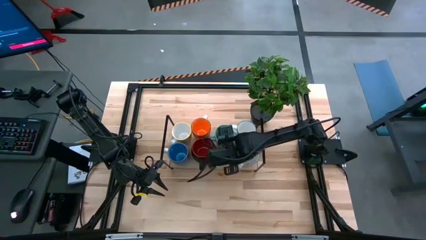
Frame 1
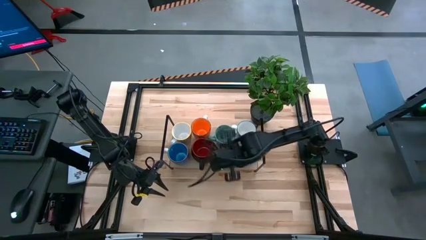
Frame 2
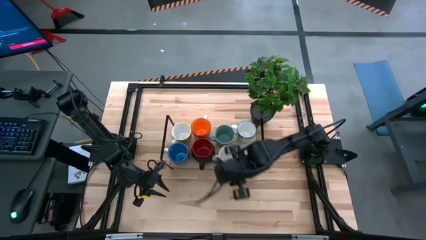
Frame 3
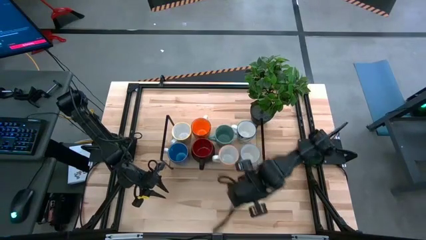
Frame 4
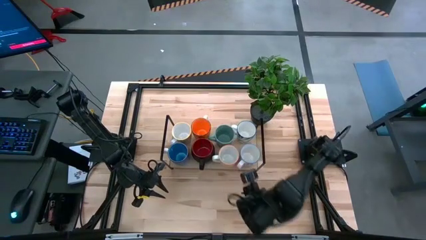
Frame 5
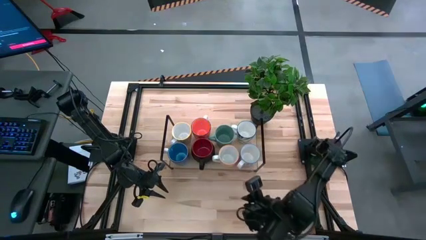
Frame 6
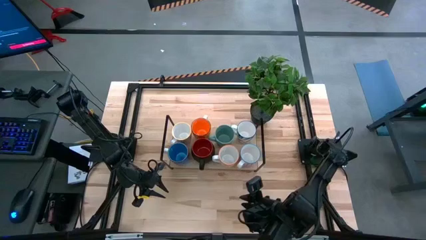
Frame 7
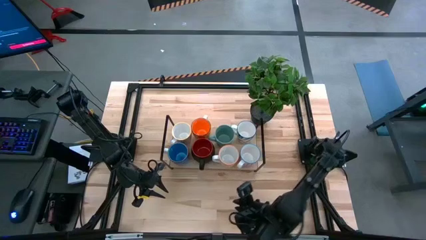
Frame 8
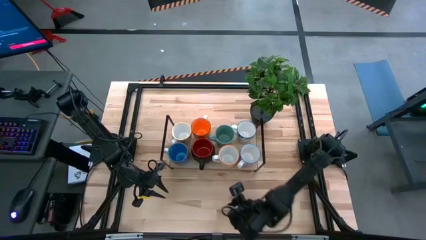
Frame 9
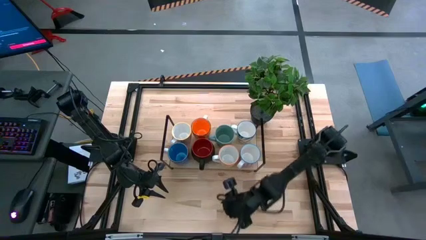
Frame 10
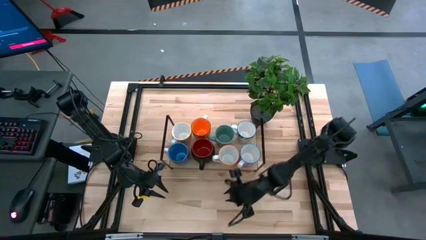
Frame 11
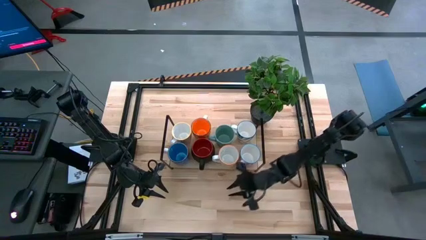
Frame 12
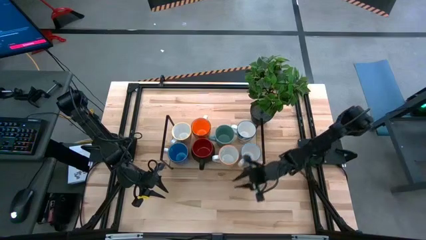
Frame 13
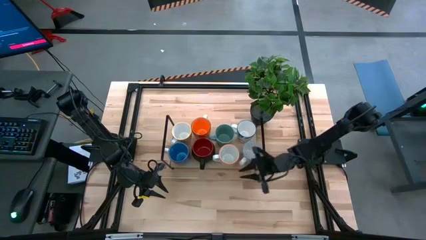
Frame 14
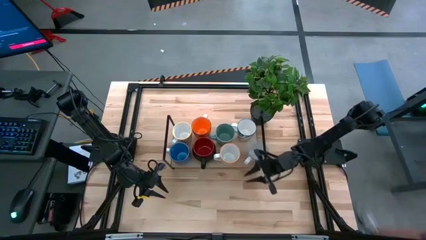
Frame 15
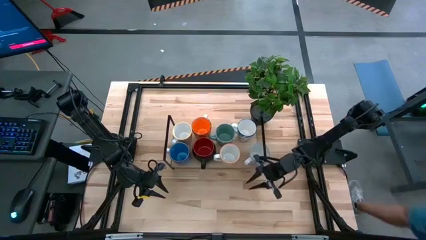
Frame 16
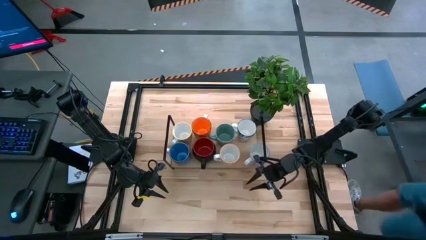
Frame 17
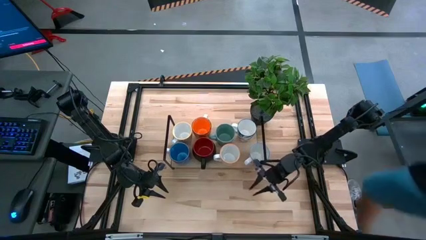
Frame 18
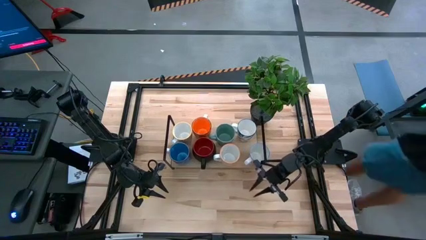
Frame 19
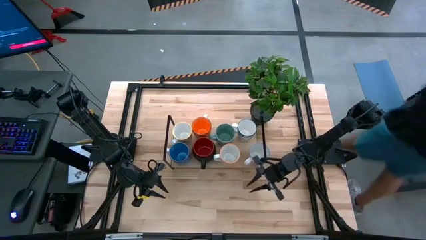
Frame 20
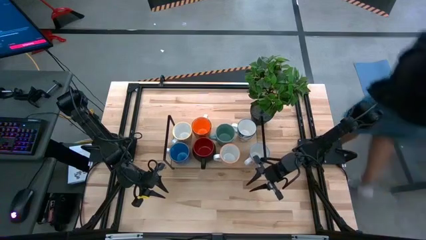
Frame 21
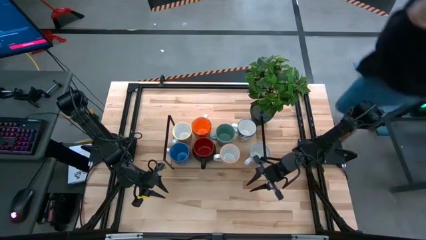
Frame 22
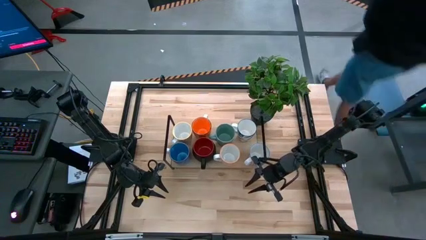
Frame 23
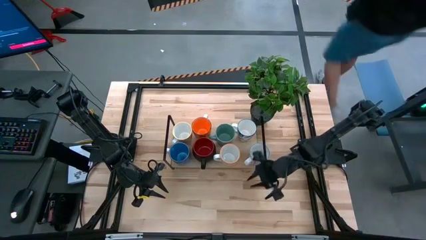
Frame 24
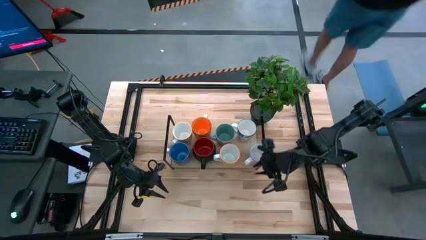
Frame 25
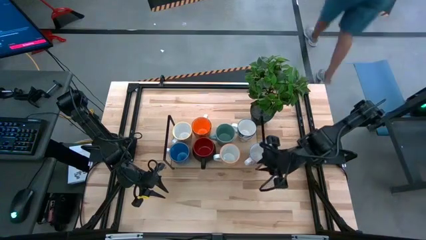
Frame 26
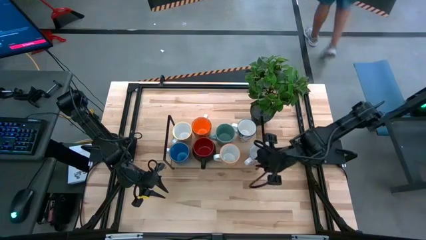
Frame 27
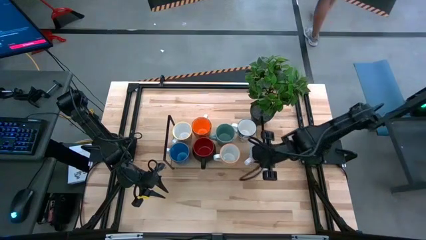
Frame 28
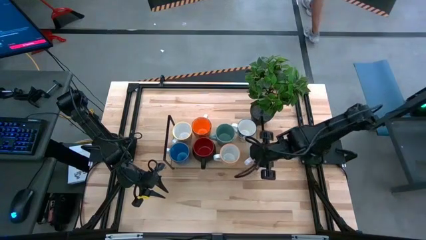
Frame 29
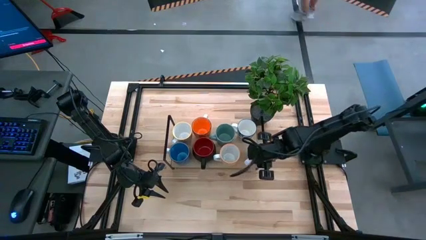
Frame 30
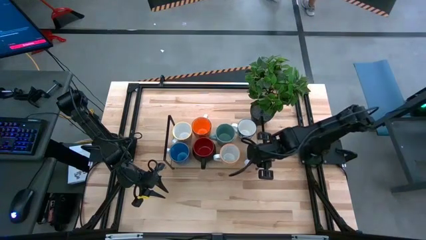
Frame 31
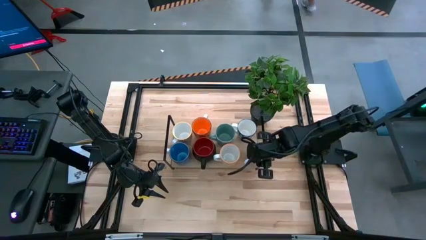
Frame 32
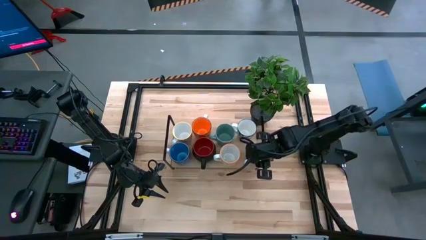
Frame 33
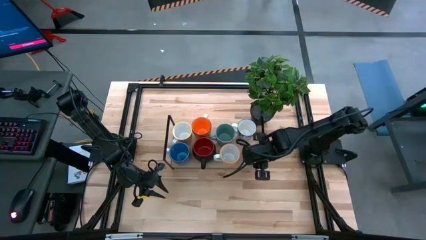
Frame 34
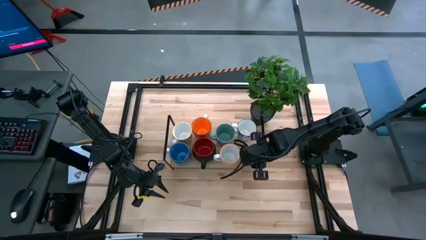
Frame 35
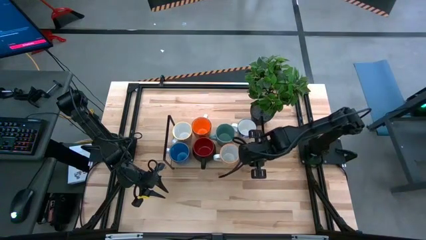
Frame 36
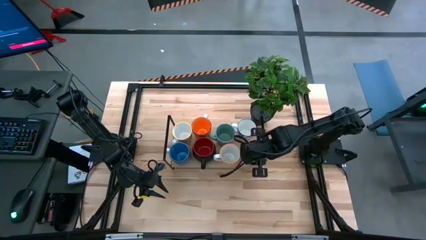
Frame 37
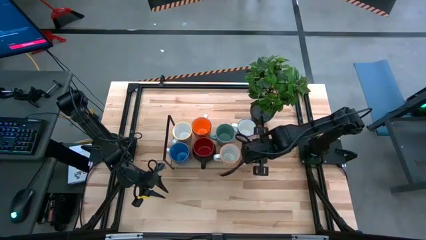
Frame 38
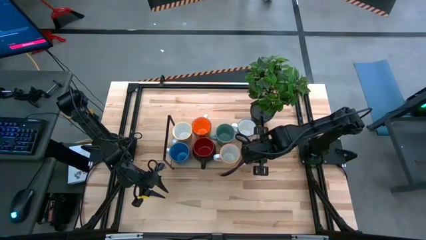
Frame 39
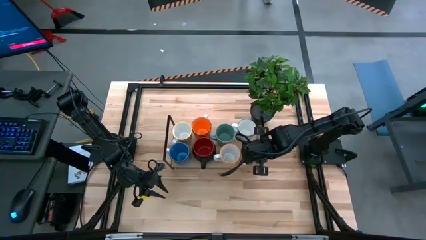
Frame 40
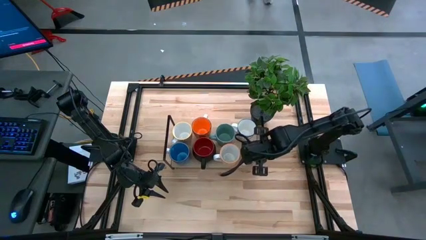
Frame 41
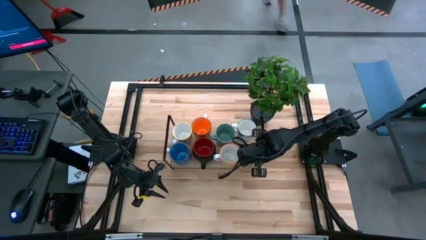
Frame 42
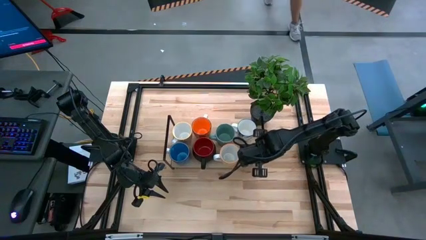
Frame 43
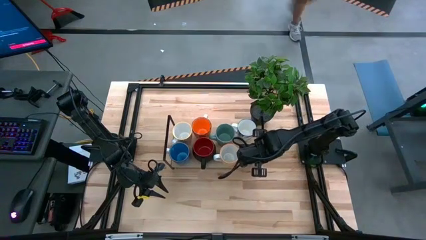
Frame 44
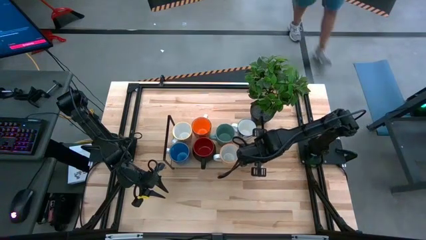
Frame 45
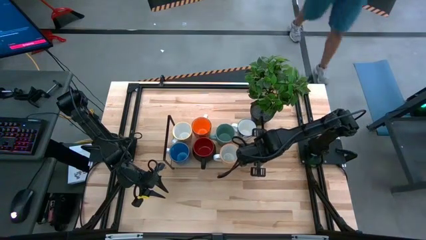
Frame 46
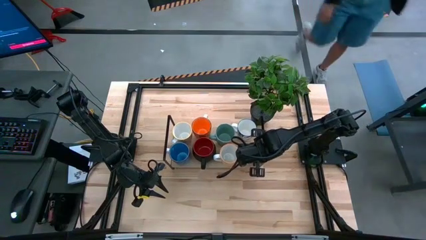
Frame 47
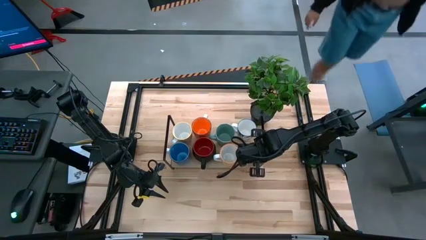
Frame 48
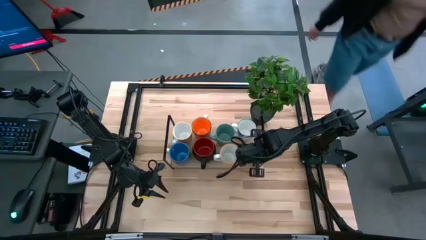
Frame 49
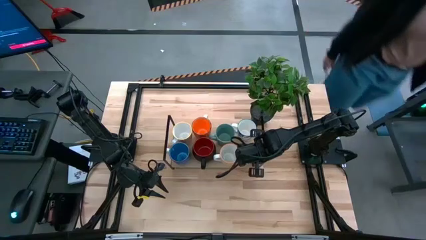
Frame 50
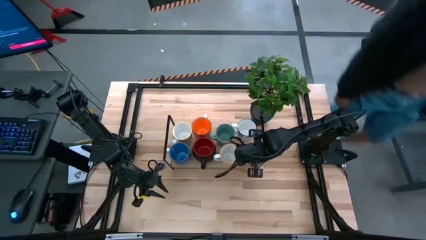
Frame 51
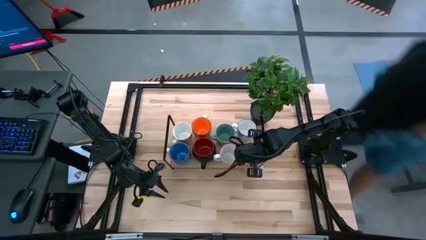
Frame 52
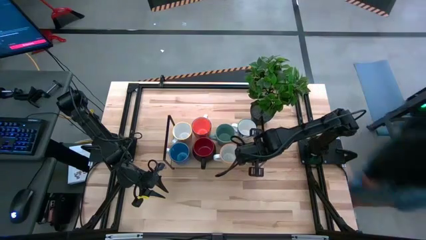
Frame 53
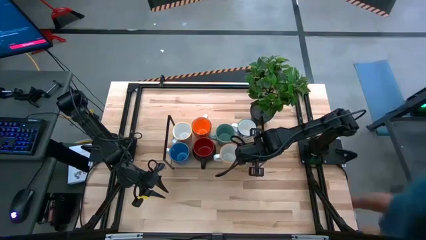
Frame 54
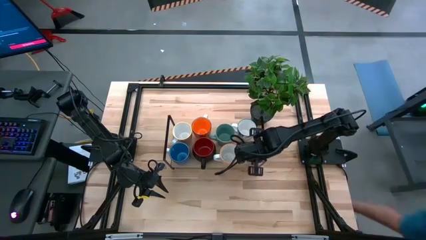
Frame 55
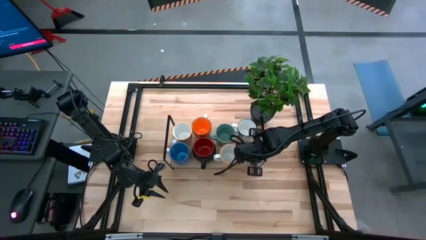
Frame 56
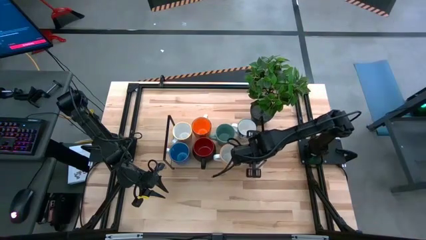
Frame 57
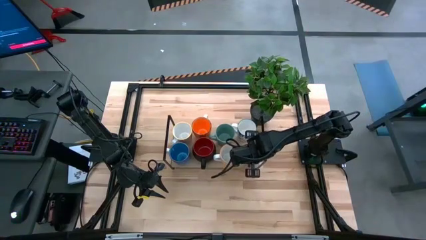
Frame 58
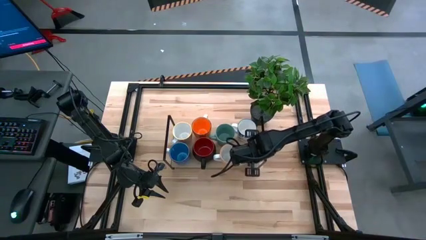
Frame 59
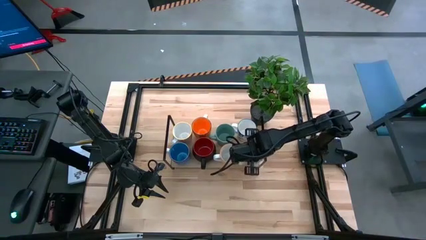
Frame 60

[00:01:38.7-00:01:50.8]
Task: Place coffee mugs
Adjust the red and white patterned mug on the shelf
